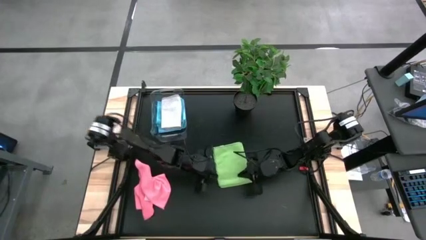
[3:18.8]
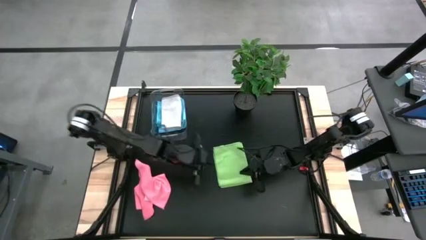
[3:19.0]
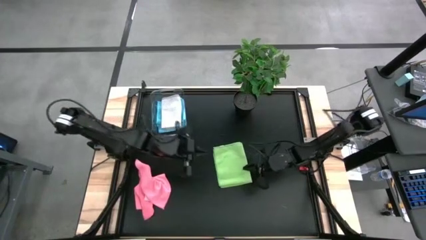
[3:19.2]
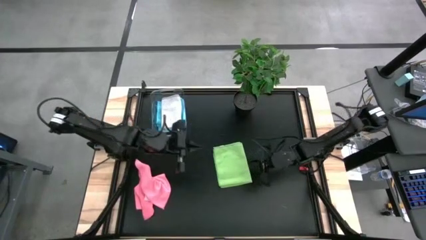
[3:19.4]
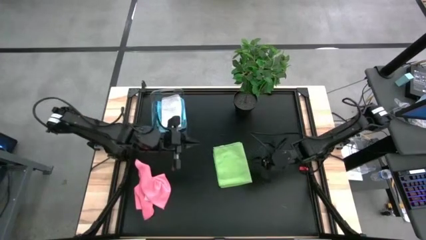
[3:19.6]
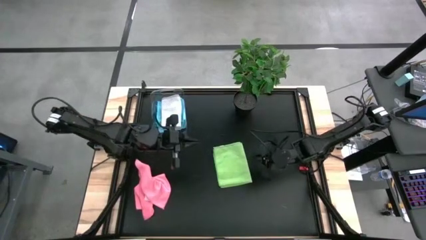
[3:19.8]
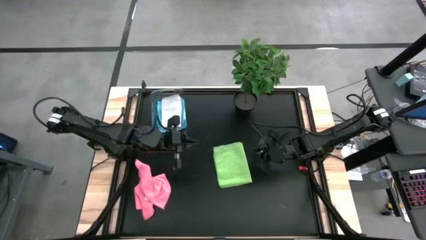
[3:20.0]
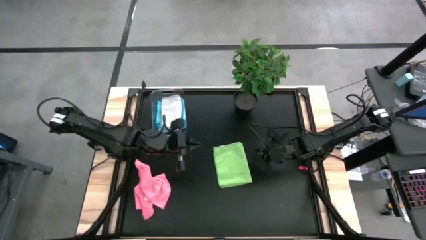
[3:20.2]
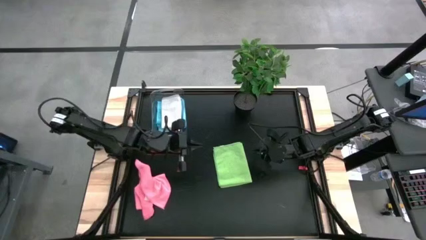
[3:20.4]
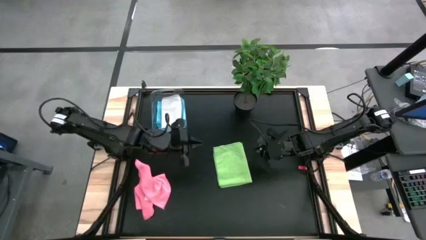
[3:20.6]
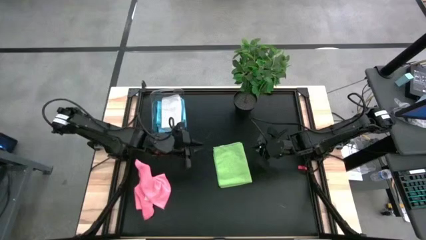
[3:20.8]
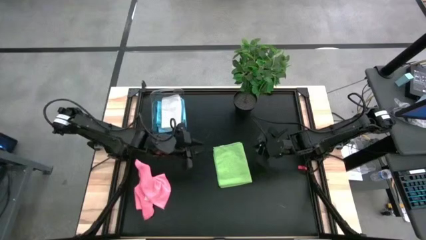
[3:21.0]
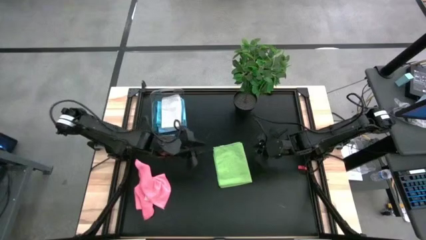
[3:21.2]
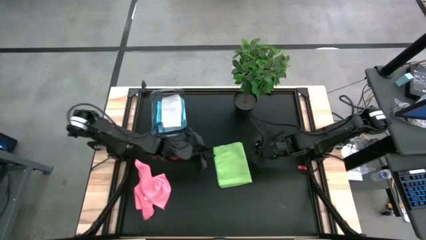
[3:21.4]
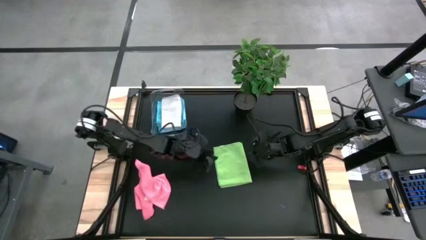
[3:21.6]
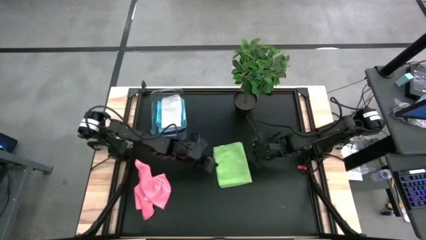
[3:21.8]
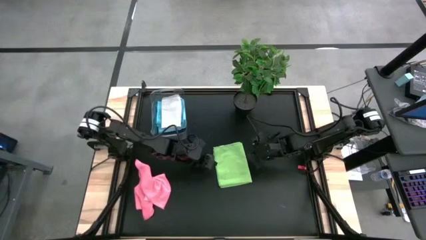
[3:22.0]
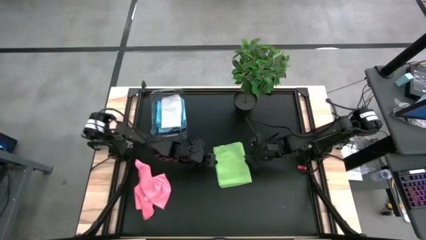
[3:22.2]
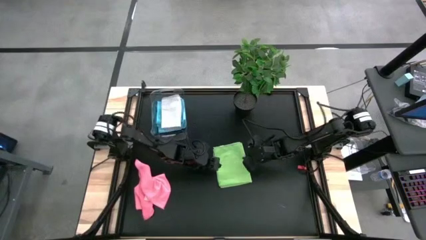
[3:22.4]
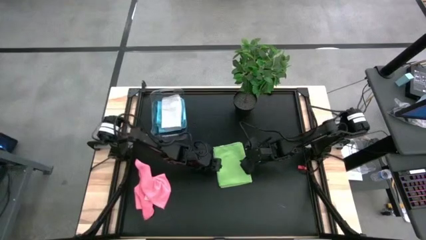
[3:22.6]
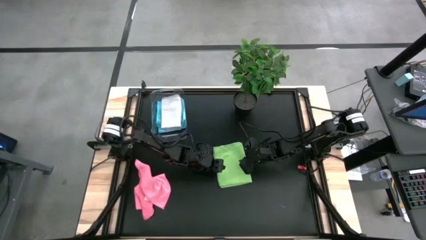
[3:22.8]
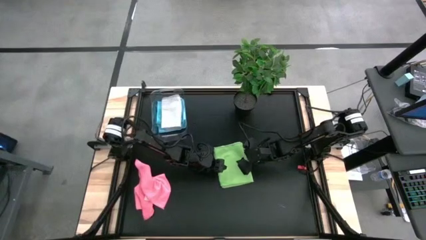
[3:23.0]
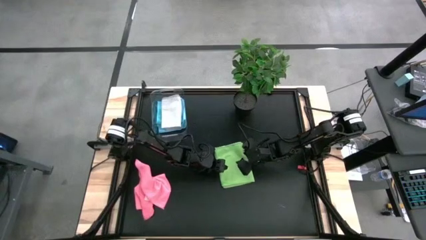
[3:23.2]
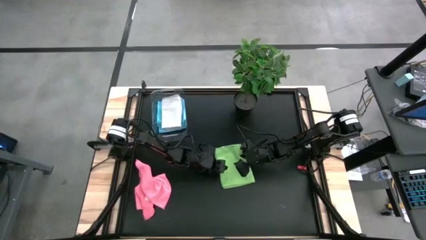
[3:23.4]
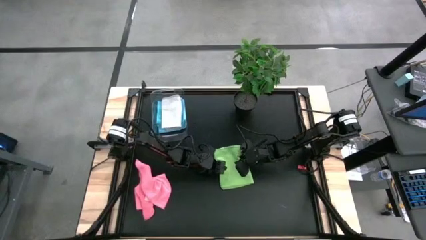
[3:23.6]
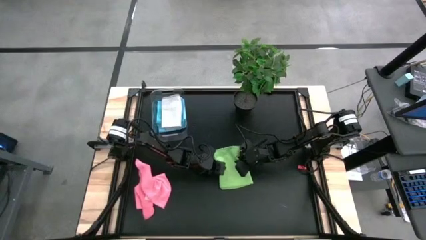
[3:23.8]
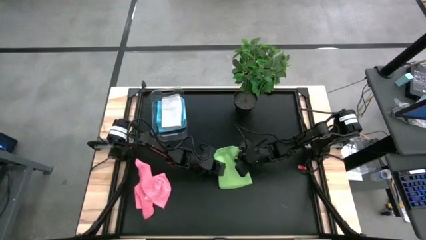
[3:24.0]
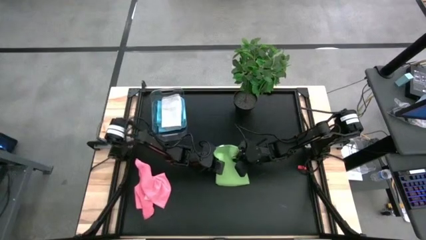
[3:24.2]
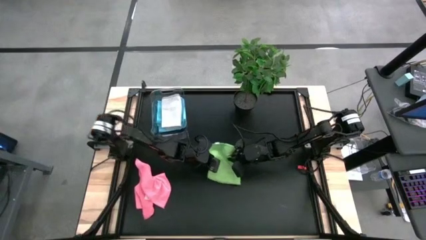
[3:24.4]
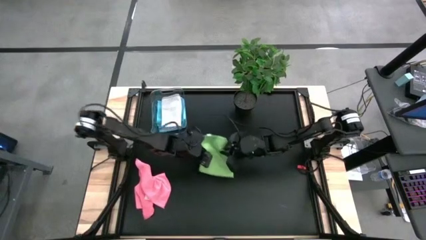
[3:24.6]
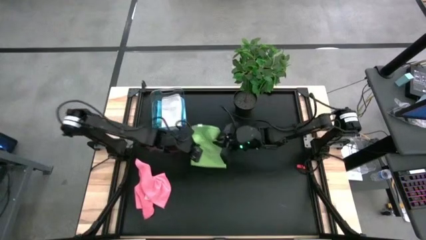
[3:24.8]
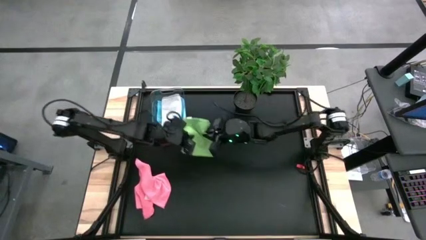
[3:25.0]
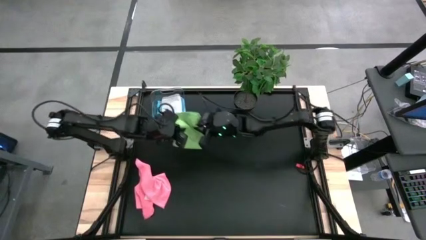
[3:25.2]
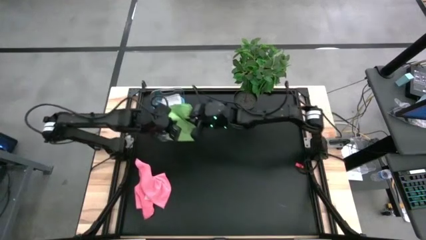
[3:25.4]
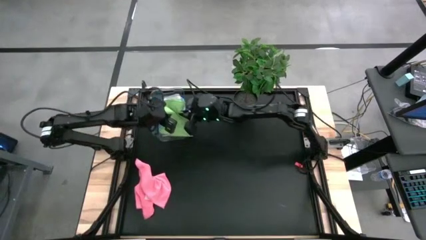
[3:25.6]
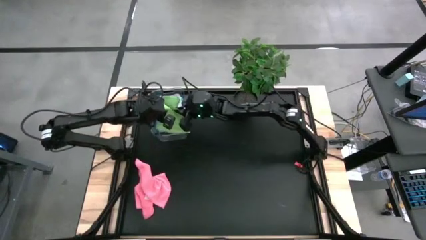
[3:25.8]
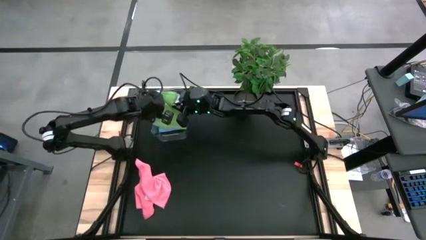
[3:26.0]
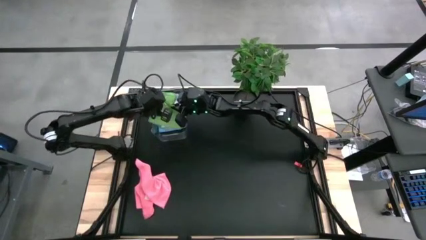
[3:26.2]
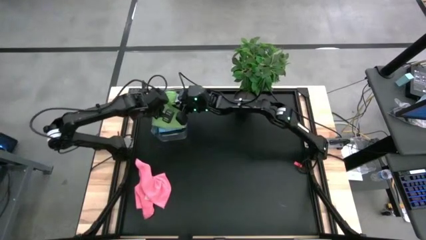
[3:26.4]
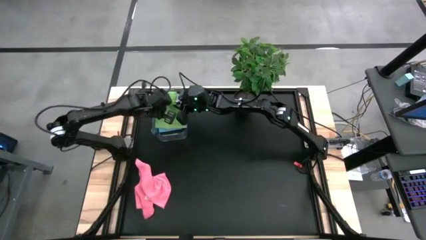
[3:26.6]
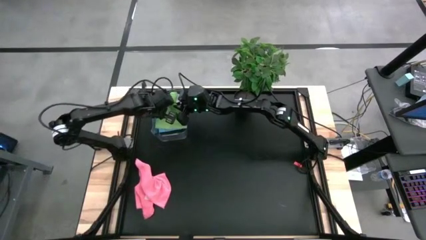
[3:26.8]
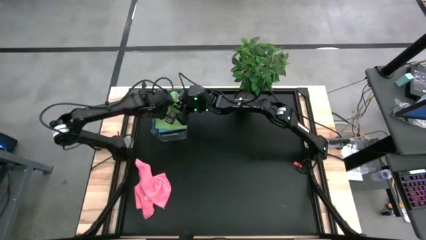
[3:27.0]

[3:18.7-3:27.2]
Task: Fold microfiber towels
Put the folded green microfiber towel on into the bin

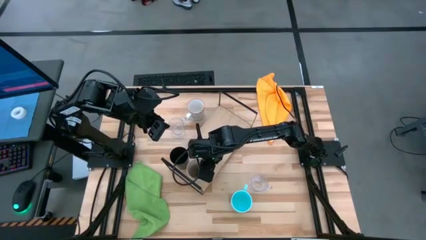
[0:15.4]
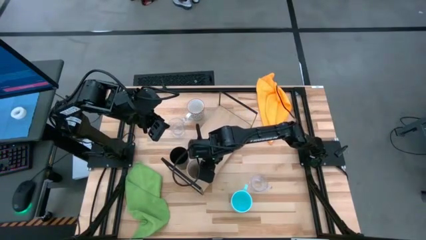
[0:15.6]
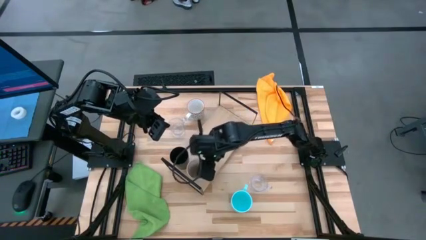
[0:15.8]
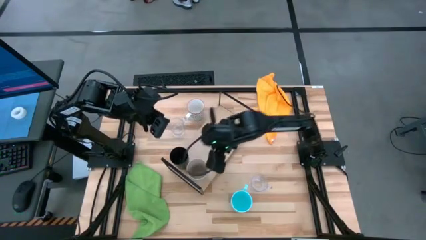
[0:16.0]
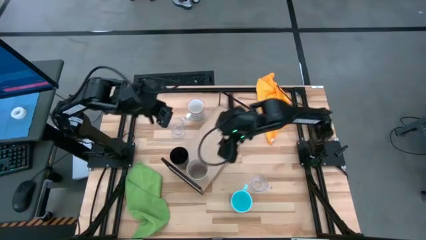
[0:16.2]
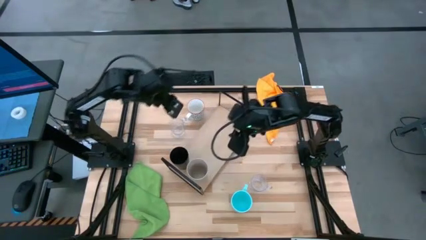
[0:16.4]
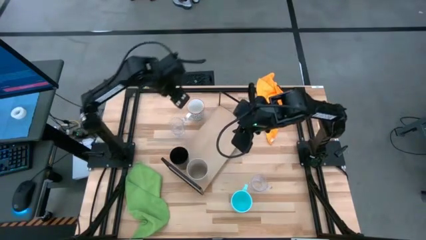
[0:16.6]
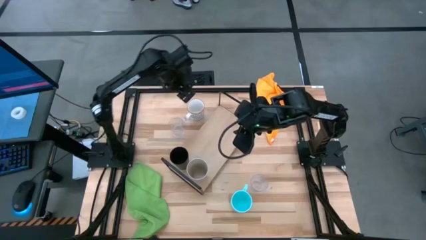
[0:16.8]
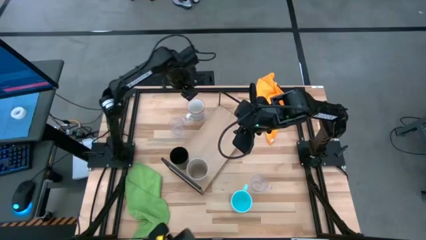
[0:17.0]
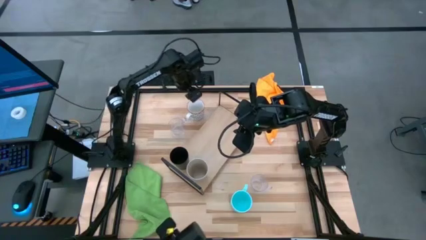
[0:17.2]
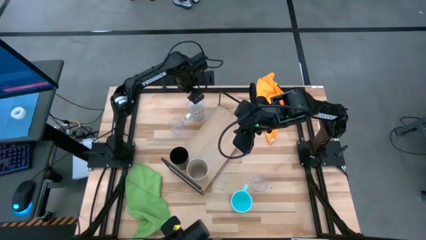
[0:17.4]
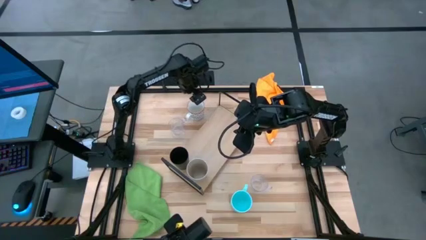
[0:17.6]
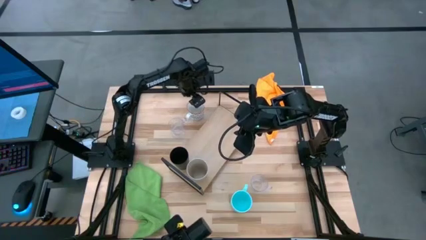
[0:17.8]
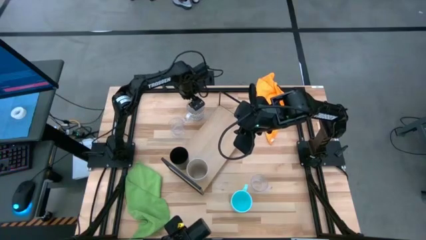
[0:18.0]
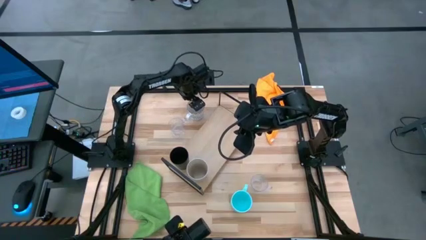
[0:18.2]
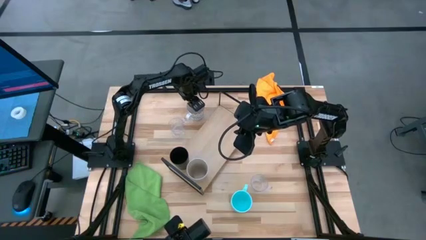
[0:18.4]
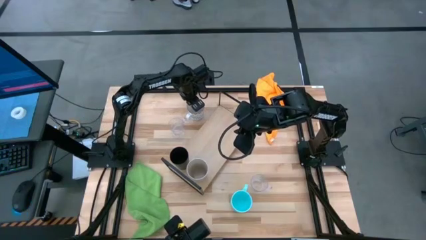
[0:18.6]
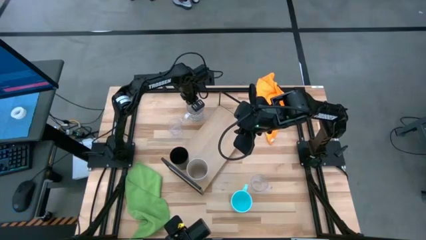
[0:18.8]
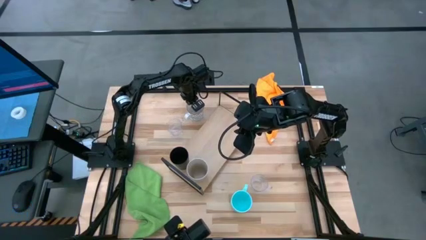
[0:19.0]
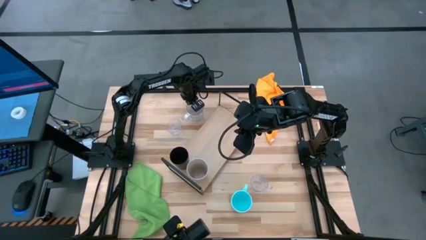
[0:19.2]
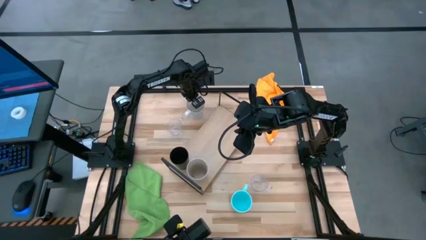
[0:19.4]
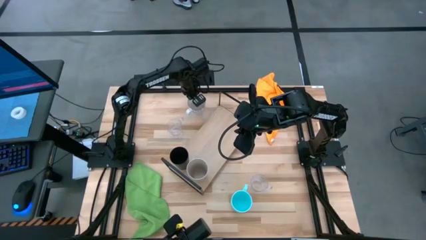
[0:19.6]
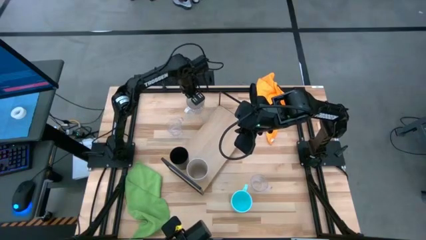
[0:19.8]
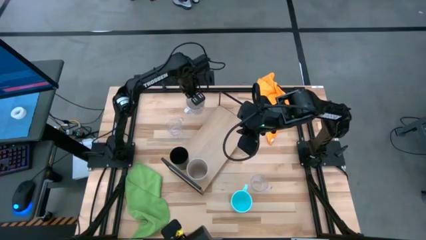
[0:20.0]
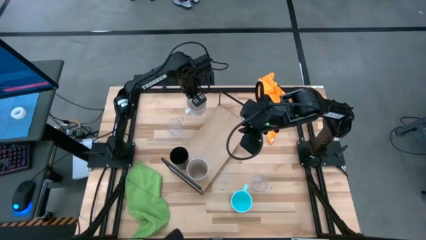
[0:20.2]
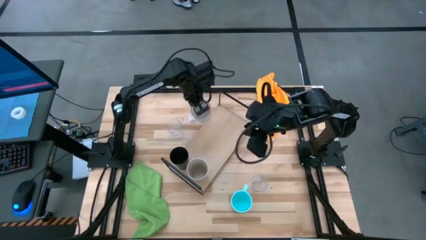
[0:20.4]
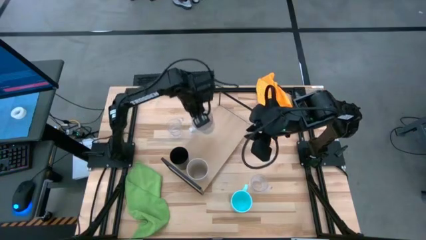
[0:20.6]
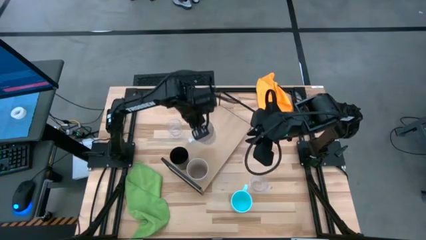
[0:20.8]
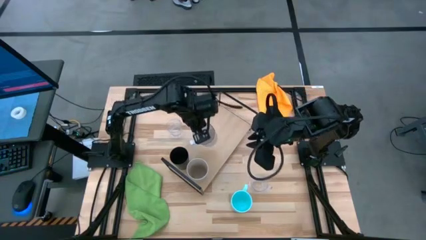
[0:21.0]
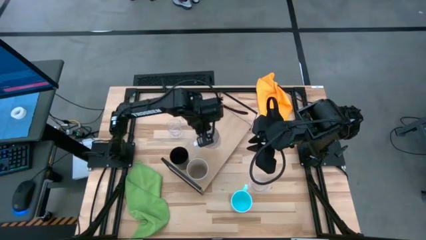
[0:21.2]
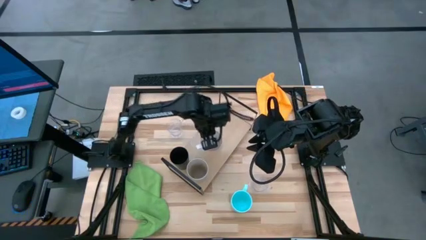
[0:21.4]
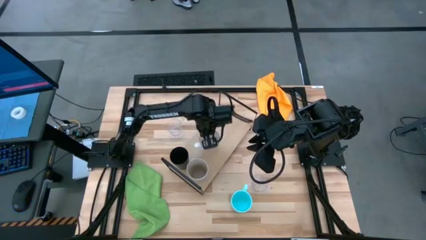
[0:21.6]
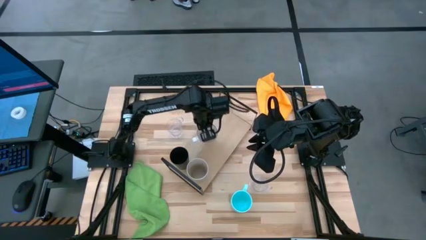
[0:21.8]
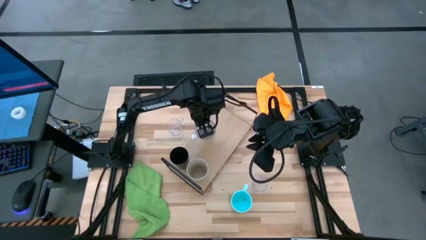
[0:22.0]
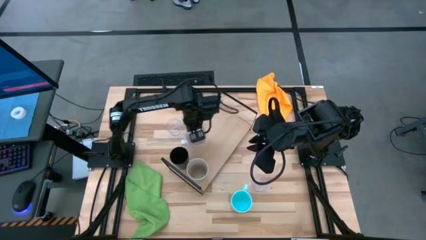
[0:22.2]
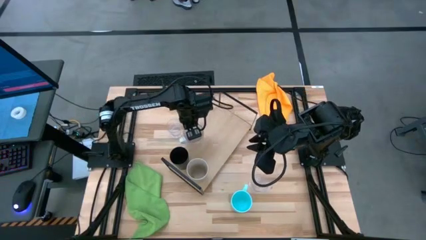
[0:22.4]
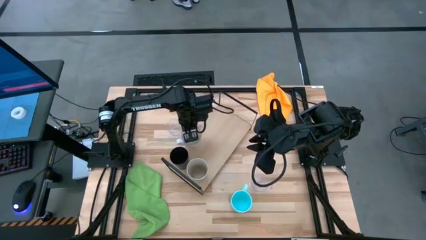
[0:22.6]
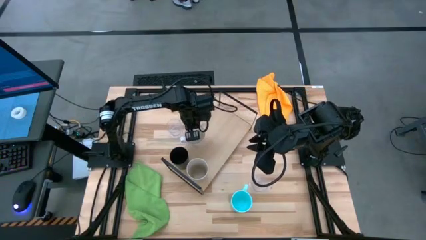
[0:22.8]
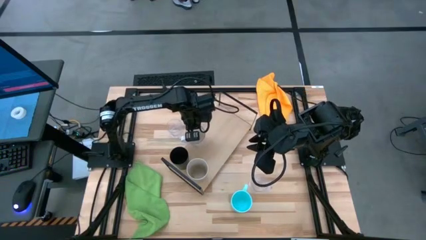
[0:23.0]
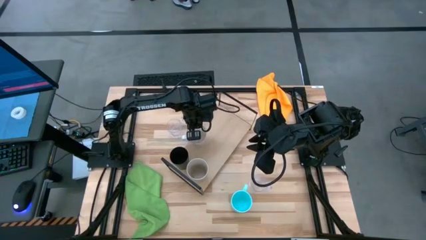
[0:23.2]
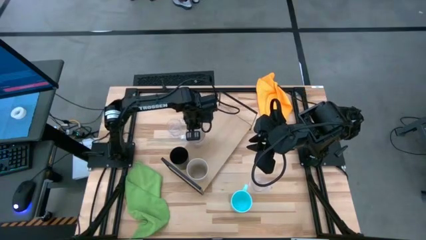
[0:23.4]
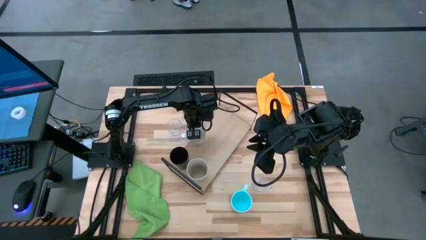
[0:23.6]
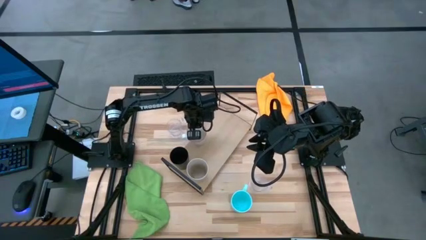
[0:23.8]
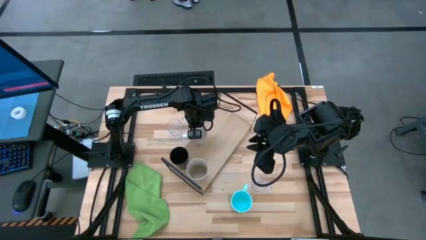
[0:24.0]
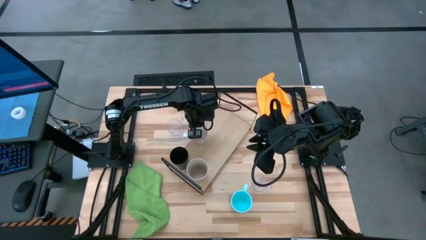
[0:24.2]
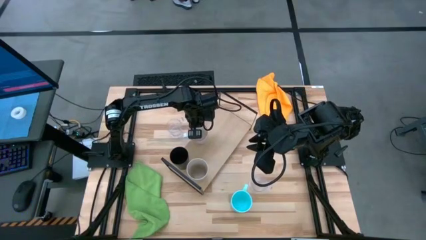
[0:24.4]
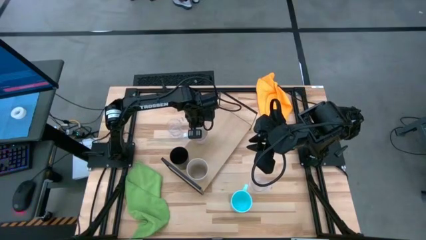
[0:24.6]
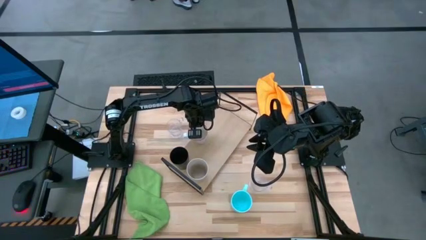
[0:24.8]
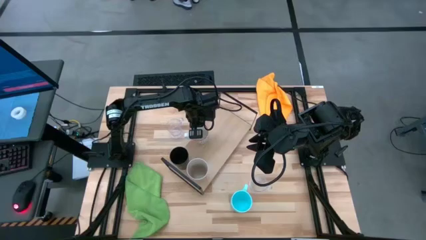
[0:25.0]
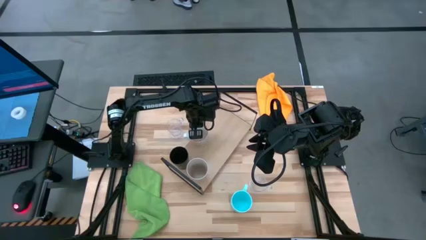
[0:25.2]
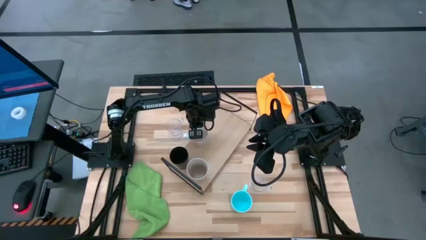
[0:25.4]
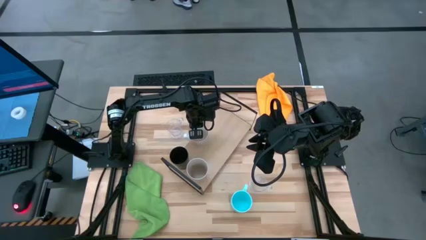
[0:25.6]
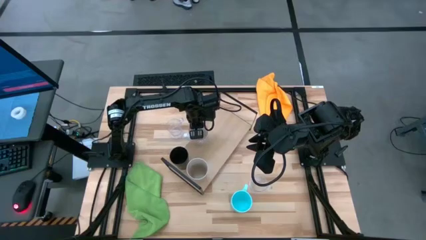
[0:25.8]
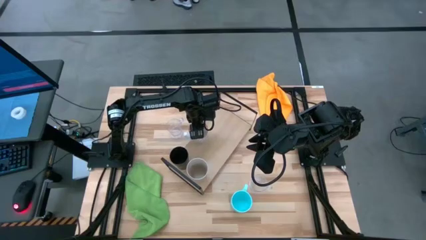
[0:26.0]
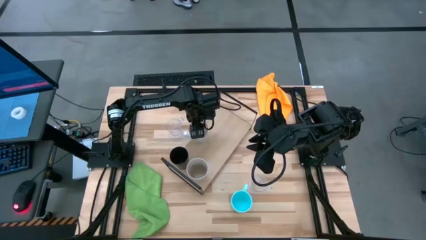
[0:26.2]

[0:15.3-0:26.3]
Task: Stack small to large cups/mugs on shelf
Put the gray cup on the shelf aligned with the black cup
